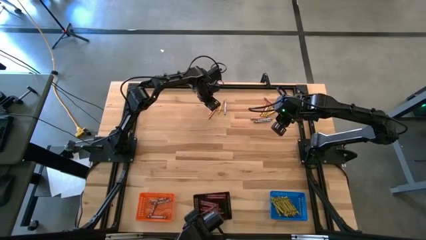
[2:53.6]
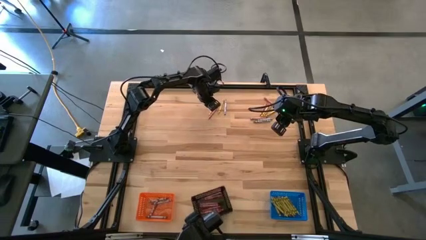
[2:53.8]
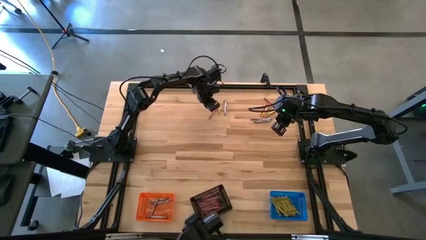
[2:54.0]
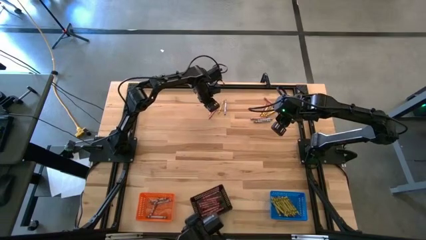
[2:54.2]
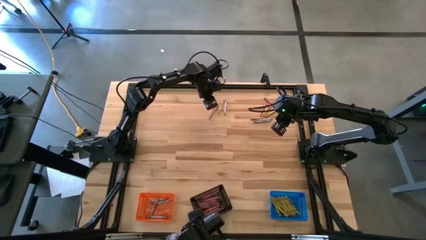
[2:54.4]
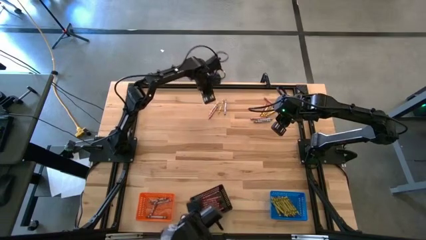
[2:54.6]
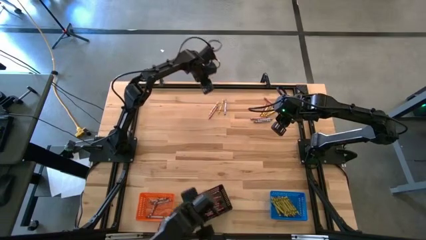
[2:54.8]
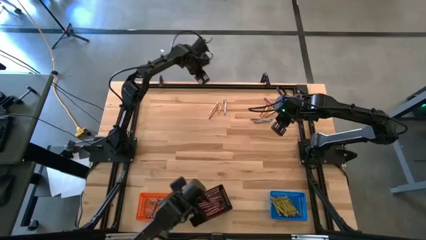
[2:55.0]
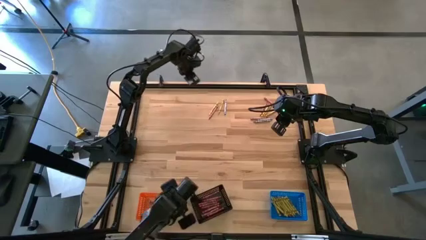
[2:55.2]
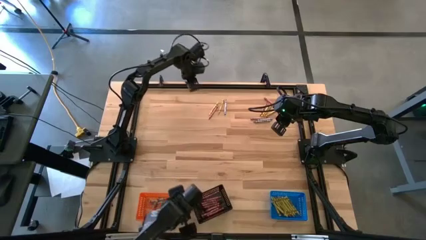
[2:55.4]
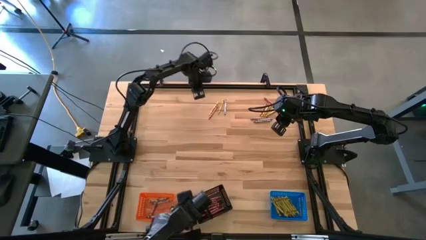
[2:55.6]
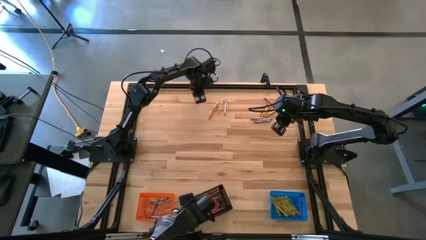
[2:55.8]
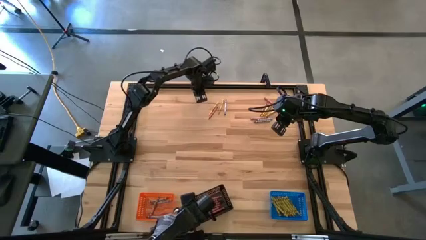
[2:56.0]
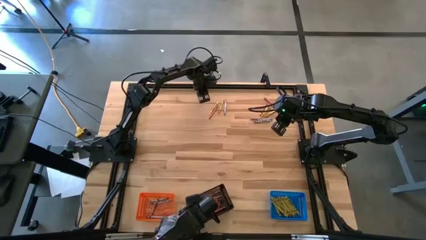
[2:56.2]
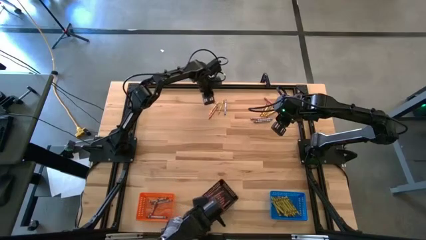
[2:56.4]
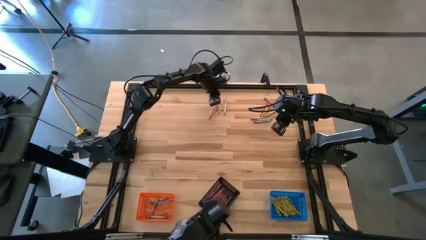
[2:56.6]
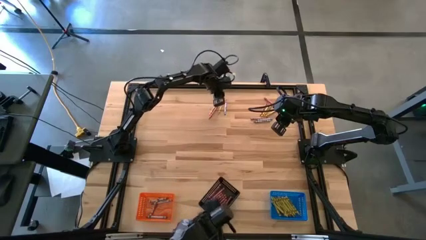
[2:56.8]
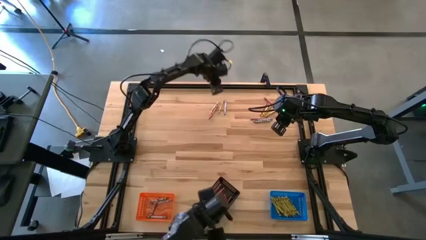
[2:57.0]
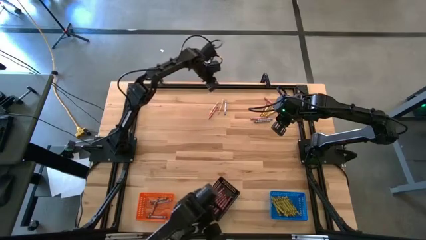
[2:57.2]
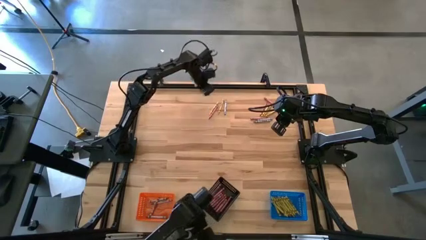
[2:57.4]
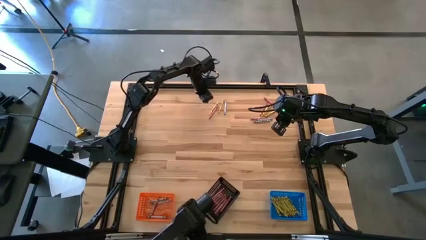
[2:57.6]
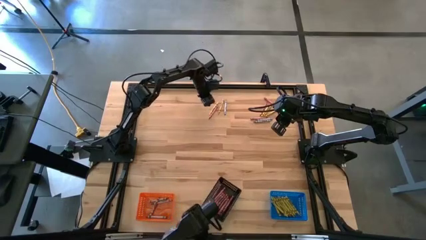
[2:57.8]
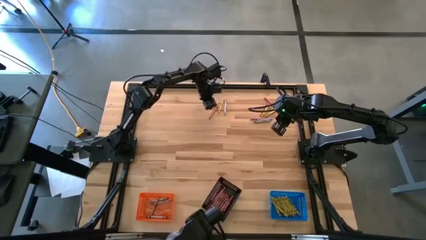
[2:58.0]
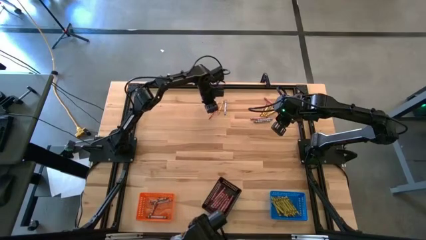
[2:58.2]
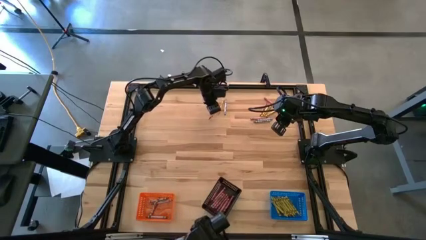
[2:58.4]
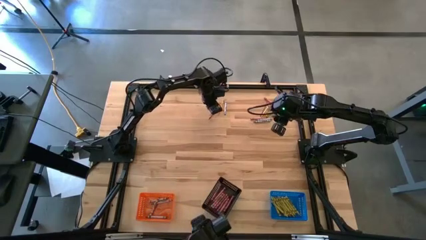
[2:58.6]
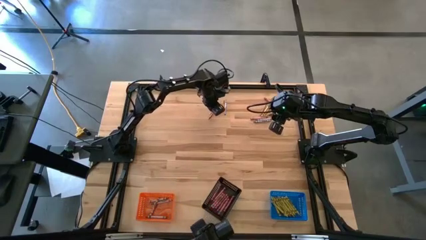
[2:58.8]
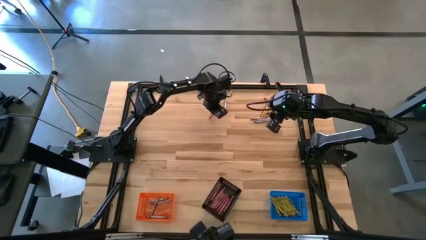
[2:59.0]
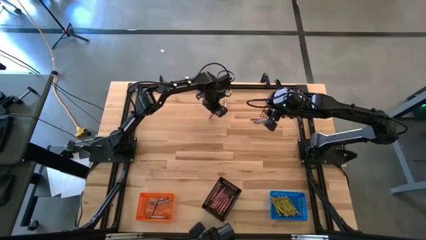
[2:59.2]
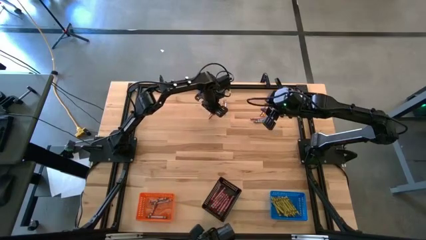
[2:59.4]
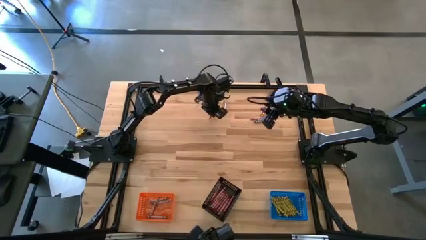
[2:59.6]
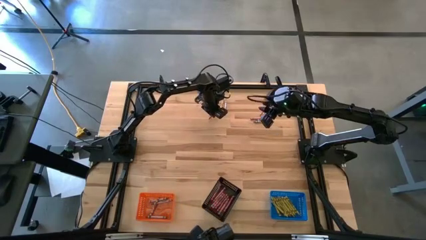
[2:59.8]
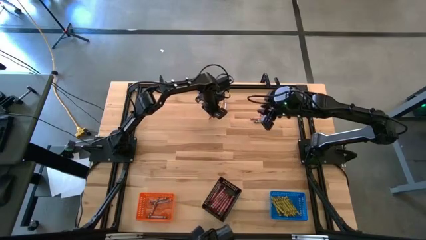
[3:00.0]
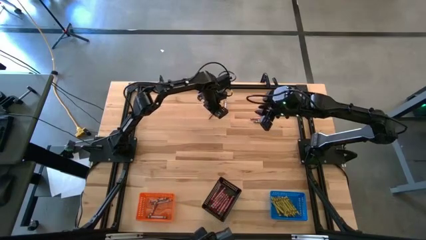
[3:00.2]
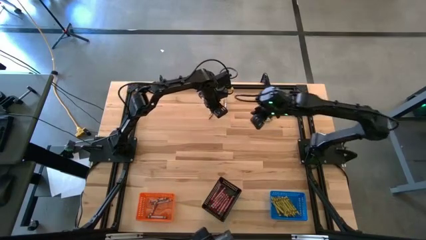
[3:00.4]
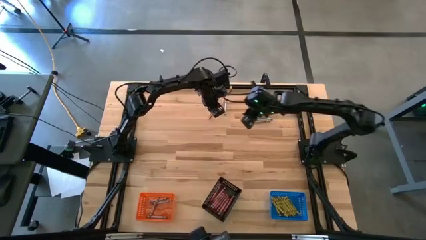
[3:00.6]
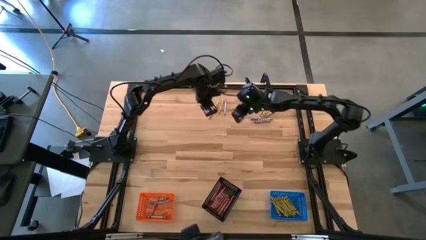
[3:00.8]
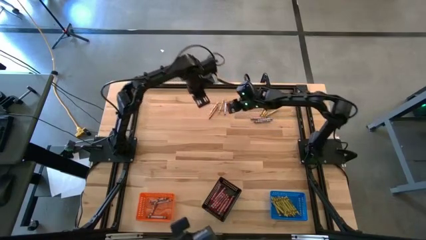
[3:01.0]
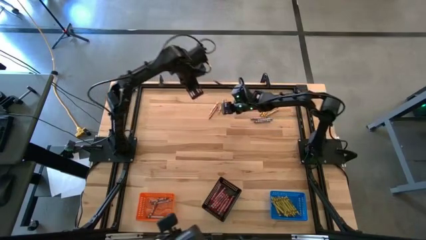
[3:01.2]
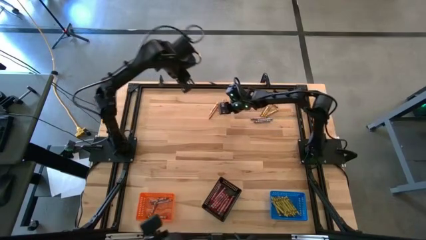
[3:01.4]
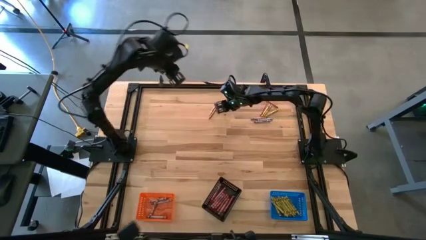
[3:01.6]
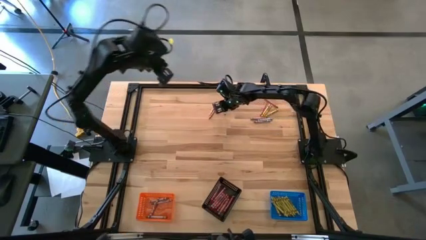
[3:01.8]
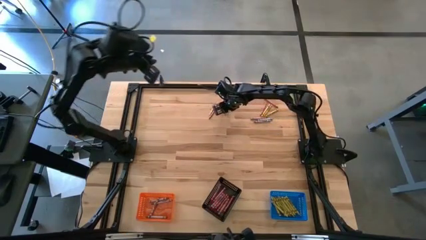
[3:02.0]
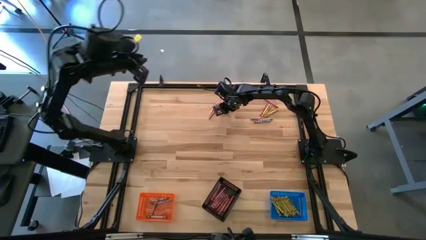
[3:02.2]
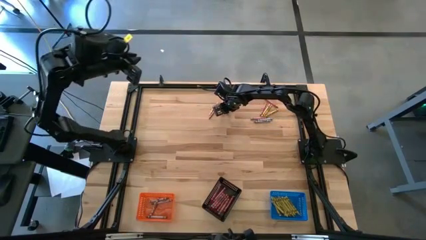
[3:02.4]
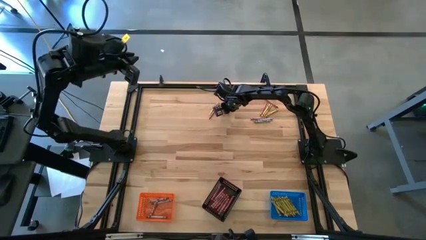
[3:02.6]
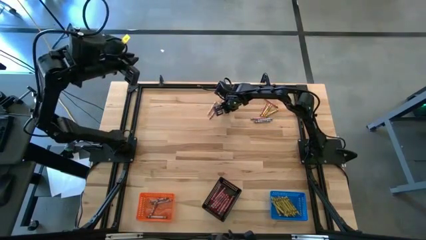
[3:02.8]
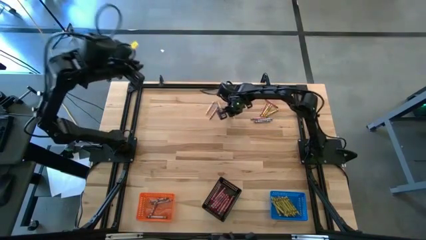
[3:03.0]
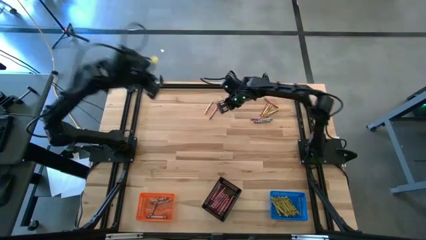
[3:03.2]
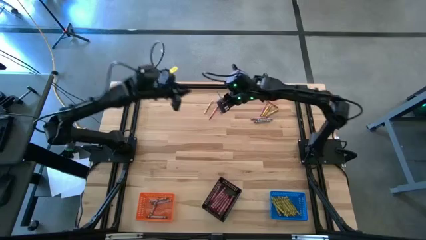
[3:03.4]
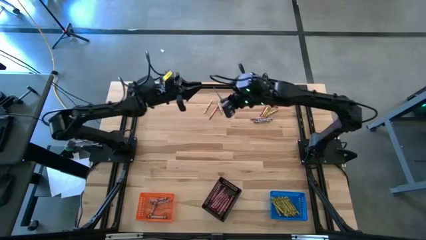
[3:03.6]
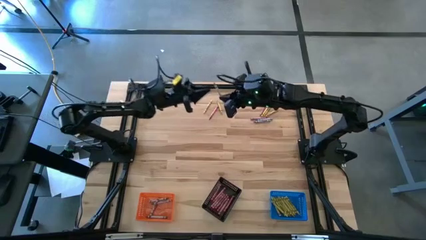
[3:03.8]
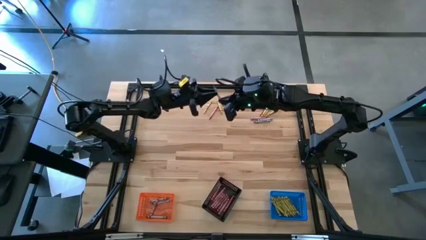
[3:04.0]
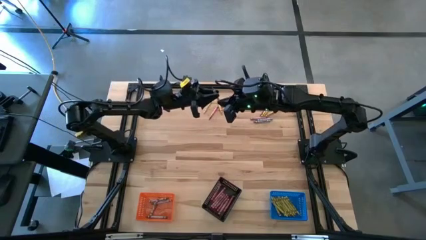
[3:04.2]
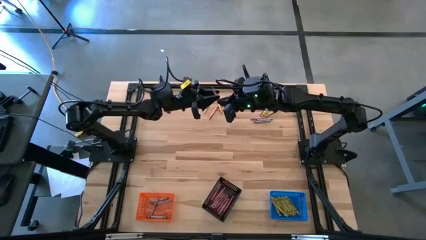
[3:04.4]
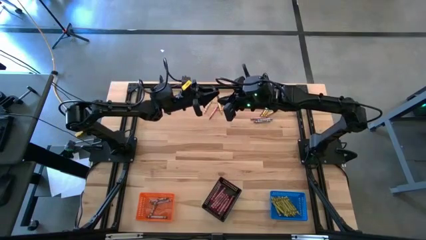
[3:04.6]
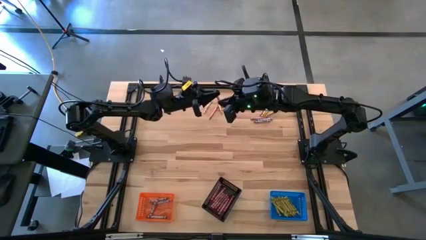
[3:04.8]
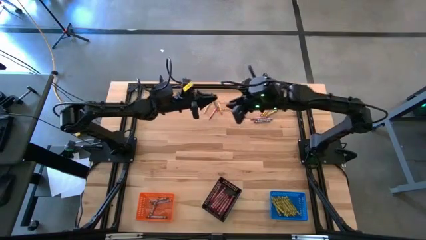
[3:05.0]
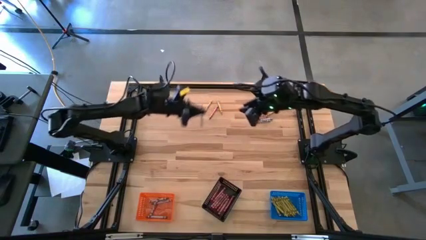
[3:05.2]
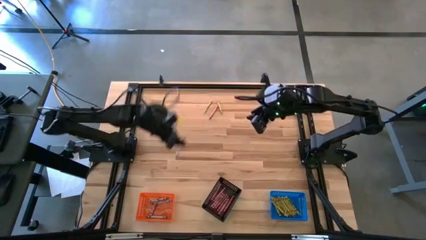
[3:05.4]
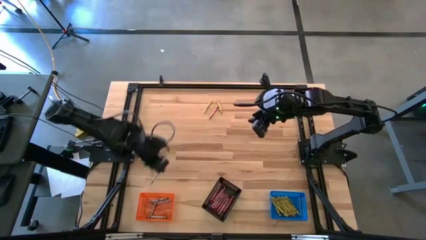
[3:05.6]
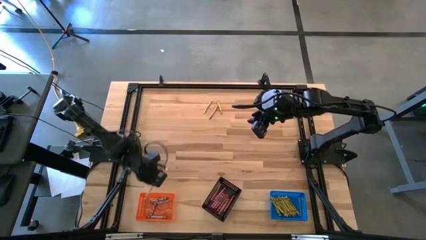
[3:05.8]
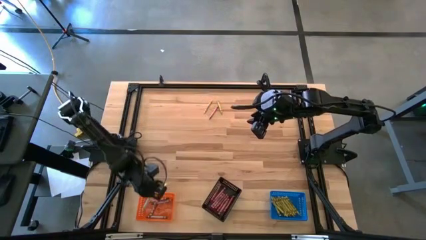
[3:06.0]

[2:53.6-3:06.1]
Task: Sort crayons
Put the gray crayon into the orange bin

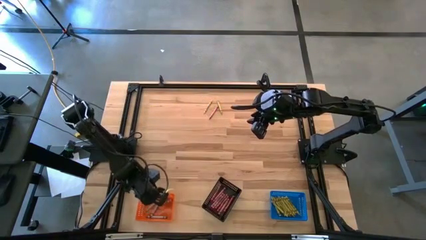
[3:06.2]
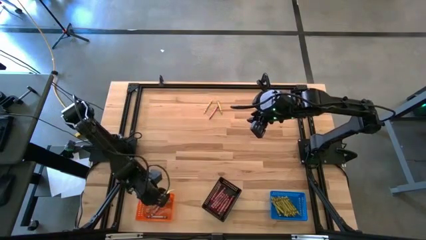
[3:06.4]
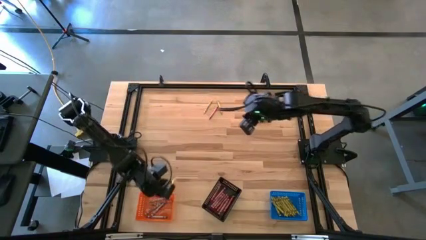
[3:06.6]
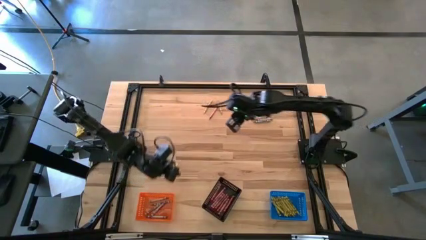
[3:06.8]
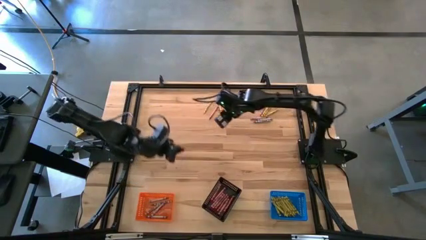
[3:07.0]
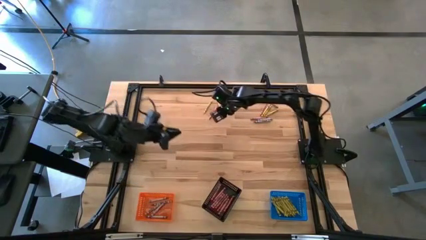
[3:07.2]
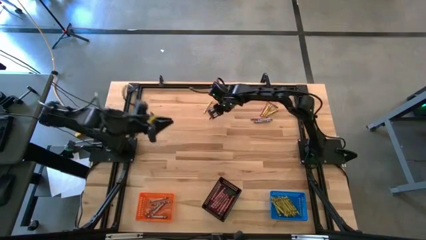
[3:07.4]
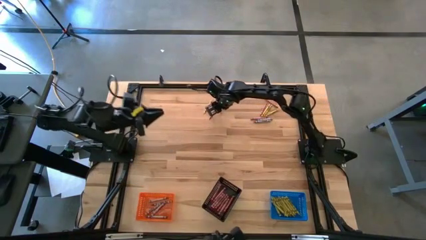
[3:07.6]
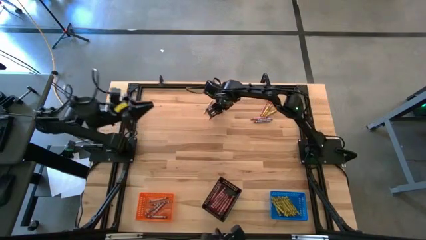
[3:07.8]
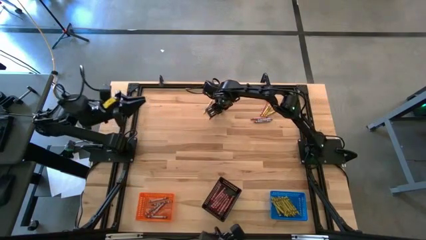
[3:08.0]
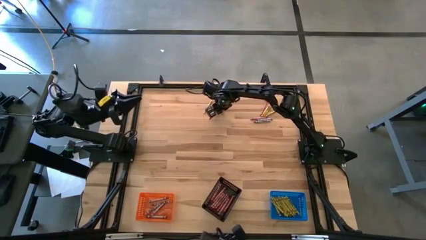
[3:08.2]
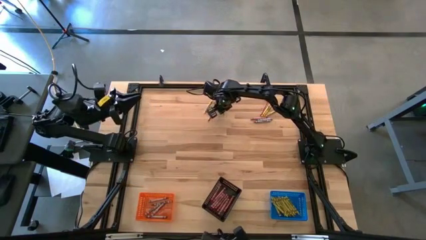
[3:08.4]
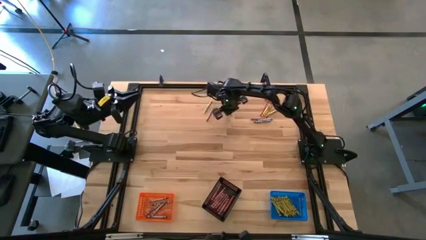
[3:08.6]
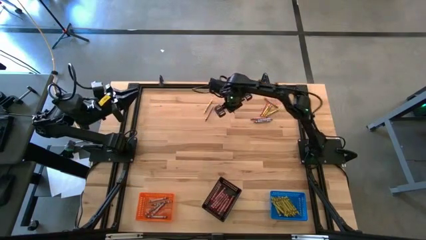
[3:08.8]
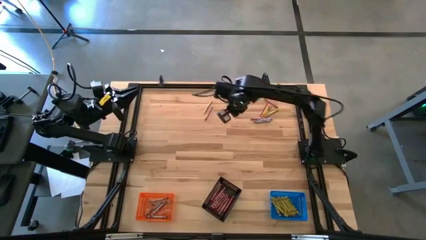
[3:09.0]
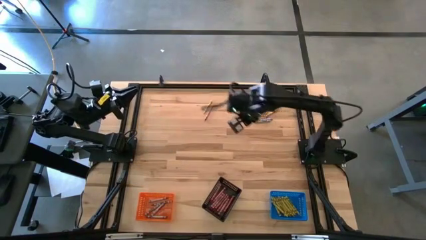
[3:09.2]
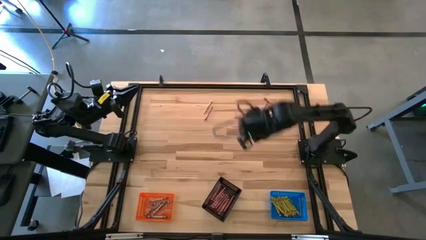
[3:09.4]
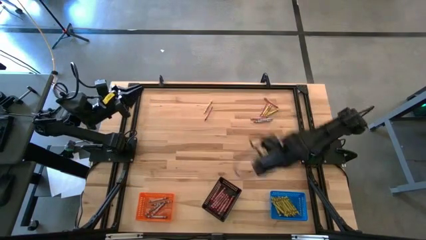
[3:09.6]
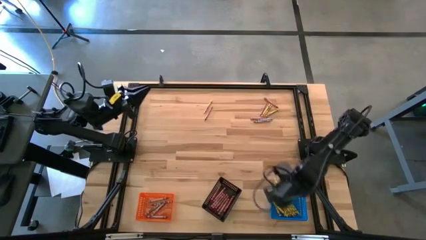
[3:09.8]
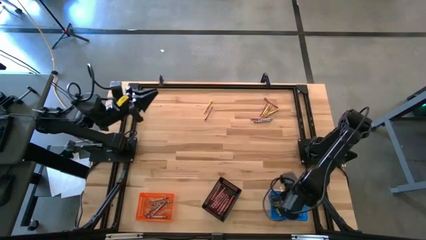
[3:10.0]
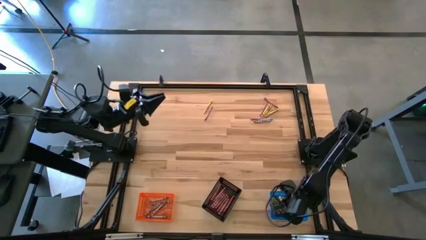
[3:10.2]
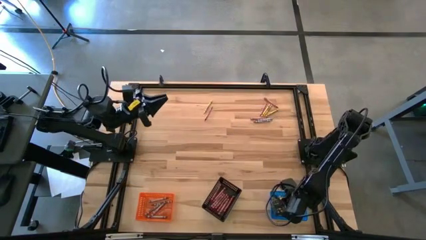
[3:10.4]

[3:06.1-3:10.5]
Put the yellow crayon into the blue bin
